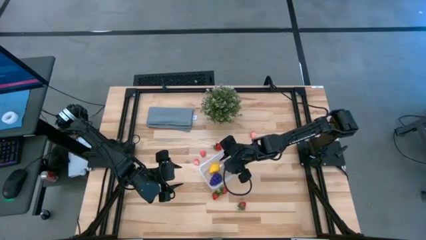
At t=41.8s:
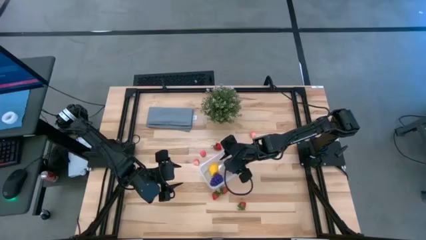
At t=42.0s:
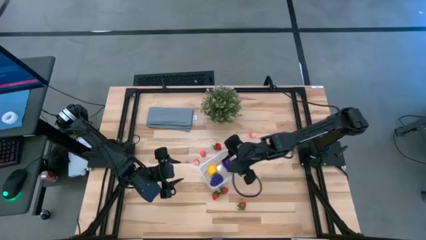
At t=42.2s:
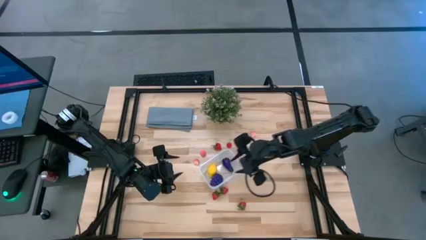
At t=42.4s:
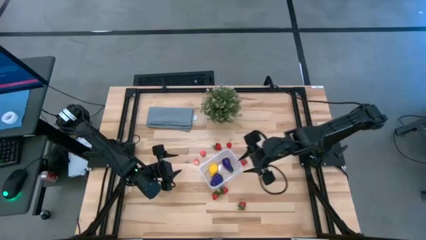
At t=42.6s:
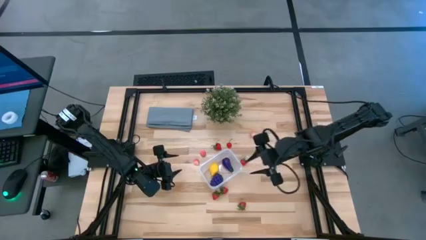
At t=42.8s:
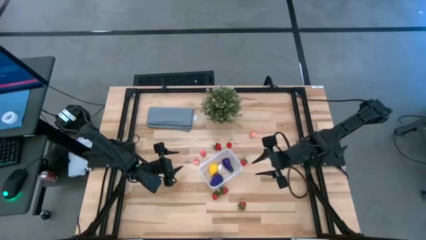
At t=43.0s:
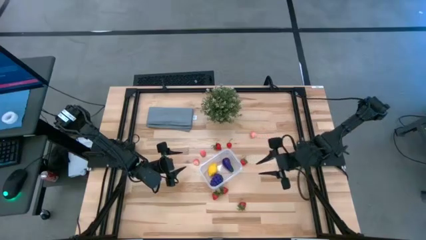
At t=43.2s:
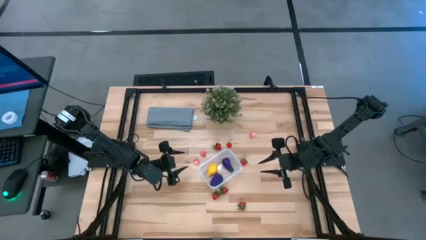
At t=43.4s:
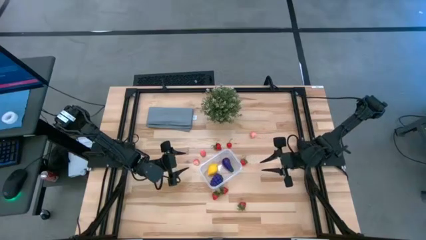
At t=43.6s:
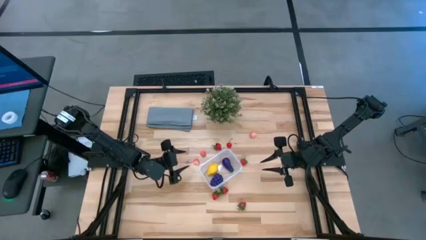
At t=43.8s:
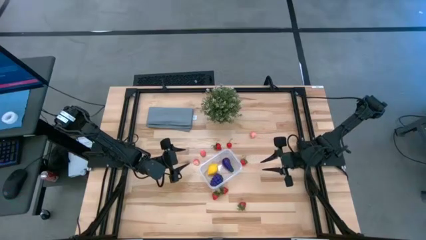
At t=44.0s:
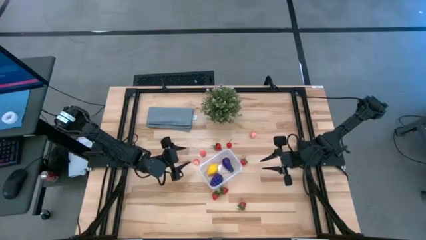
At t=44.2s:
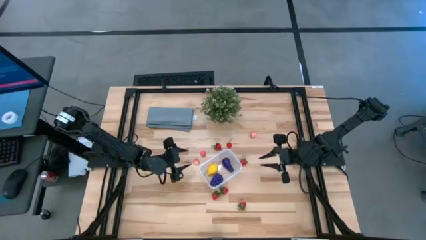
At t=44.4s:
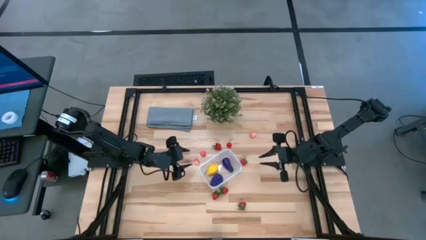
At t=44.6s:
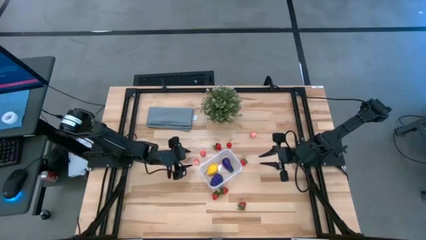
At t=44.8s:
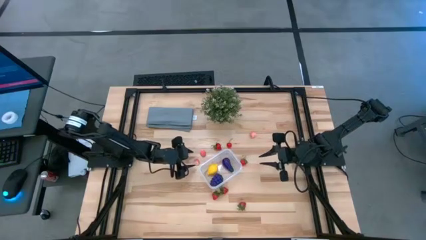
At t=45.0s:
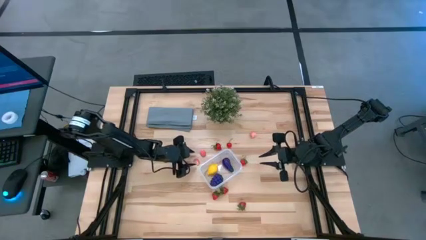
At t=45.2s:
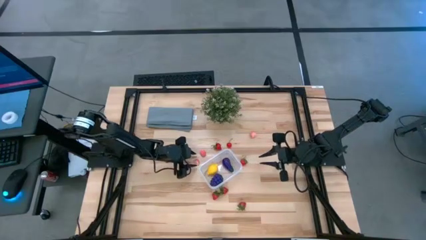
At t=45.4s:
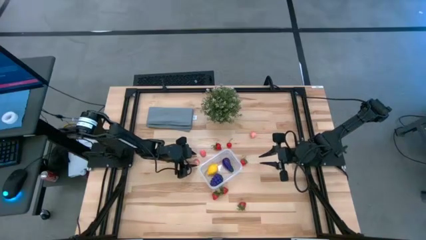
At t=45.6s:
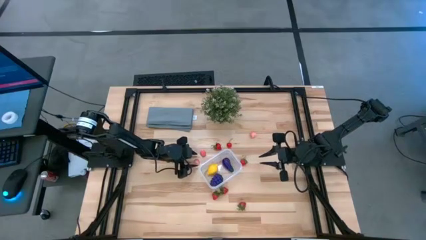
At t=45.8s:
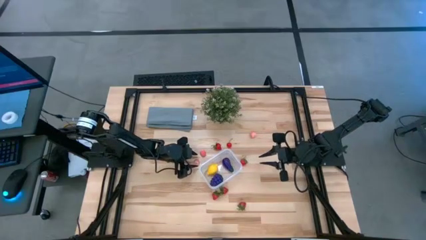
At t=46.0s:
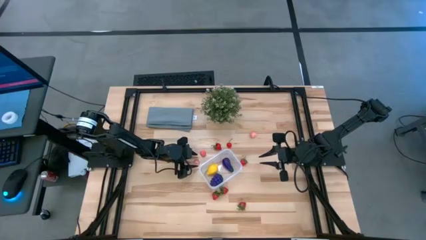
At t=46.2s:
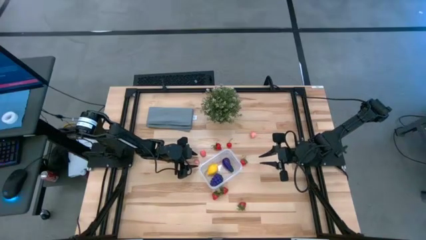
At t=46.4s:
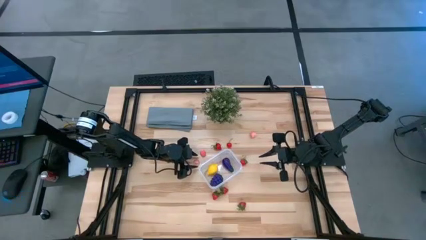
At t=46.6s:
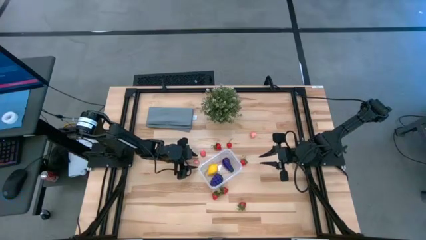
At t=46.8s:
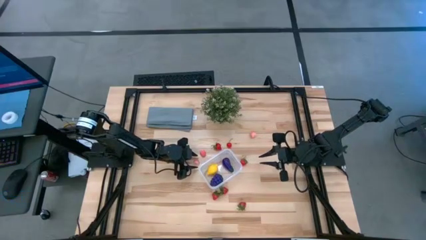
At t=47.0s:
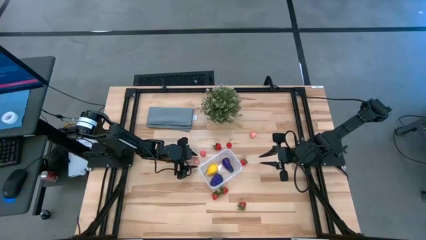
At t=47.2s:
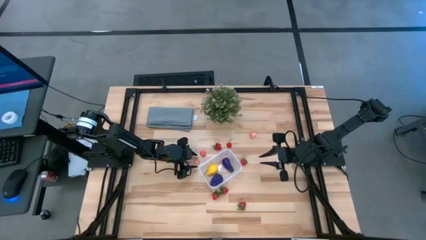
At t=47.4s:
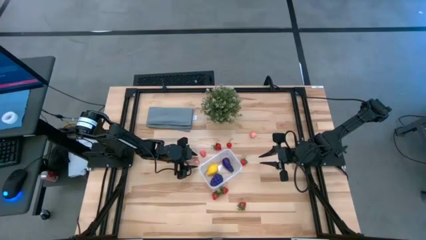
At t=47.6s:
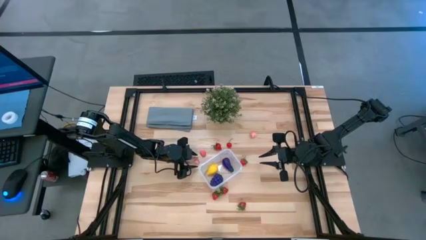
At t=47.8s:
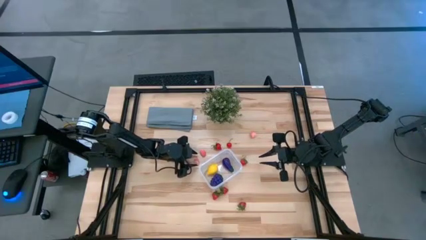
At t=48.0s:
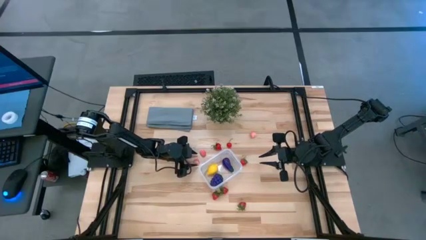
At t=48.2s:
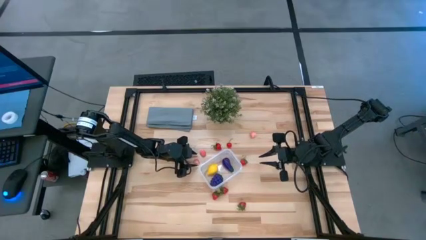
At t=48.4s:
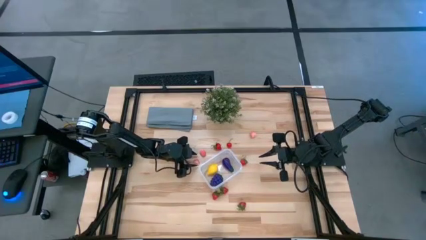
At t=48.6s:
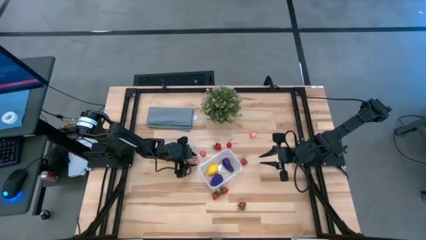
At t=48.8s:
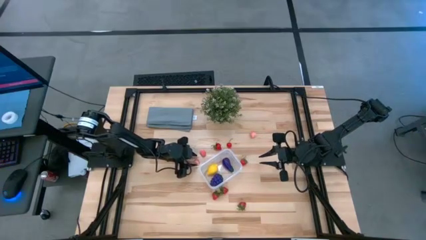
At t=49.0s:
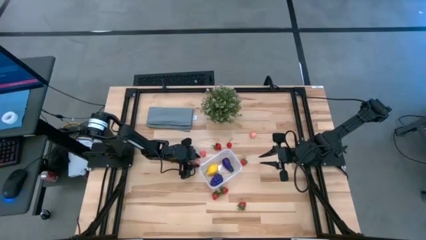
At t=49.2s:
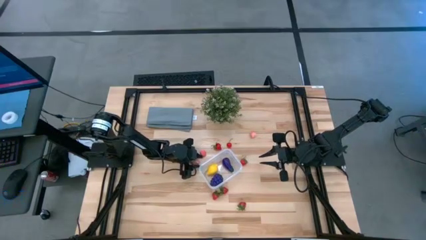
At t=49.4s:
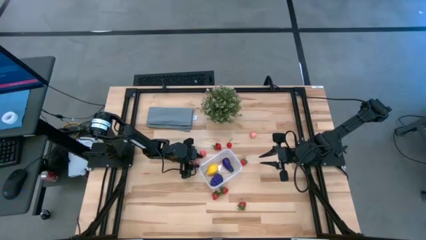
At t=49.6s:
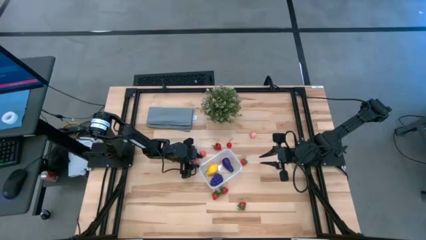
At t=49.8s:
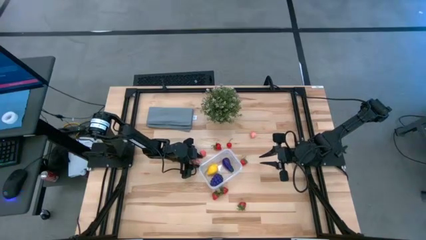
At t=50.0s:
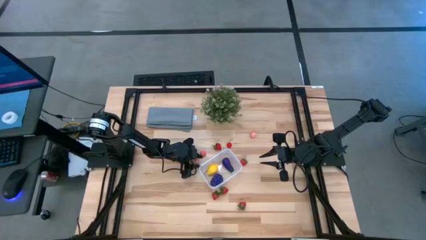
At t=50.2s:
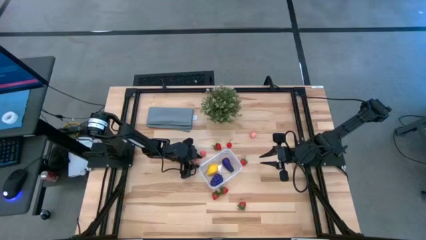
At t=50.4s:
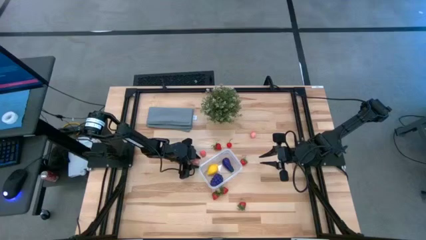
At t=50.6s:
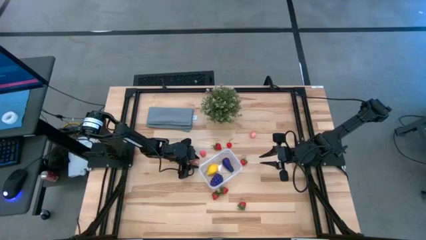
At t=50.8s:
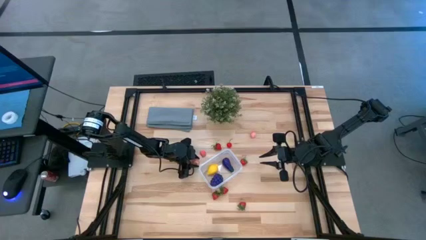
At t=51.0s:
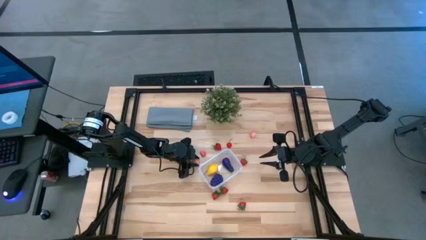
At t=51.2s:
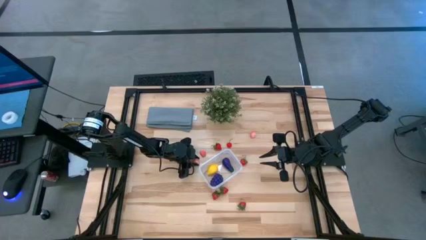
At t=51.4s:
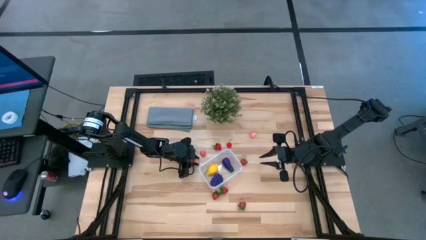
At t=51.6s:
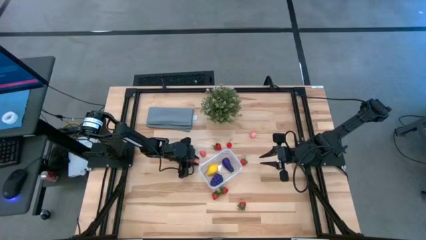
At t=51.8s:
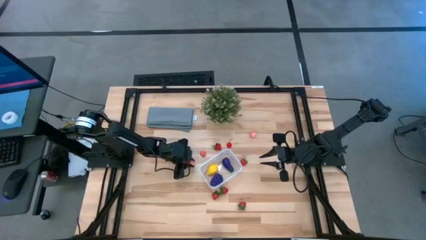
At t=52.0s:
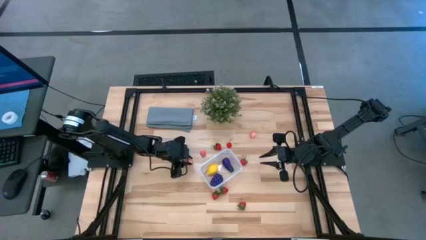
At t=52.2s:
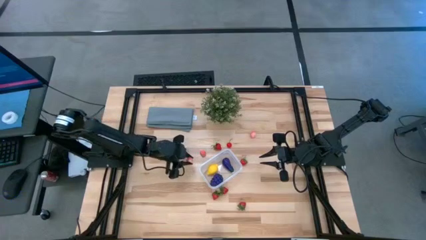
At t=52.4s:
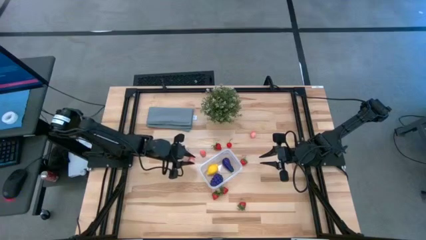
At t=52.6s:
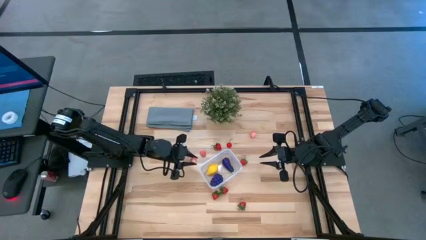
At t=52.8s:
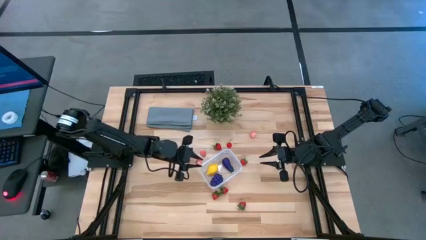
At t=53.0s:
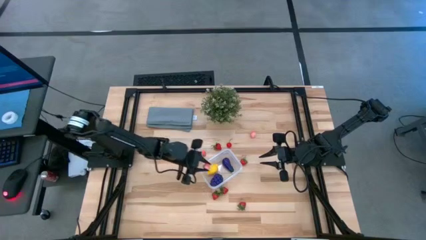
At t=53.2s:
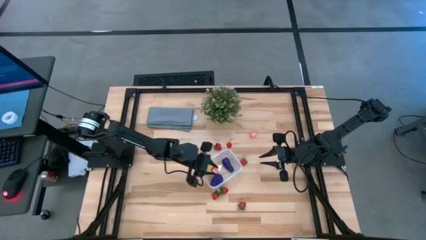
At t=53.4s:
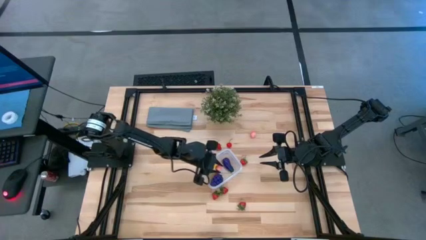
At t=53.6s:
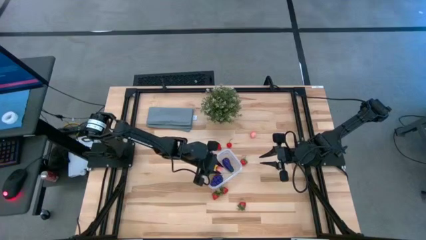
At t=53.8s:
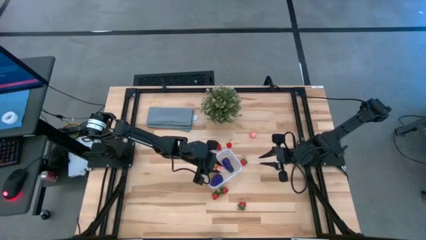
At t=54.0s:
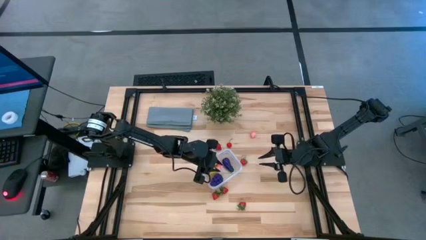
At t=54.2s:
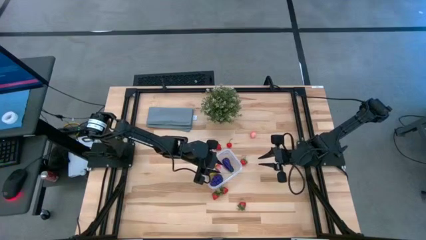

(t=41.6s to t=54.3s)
Task: Pick and placing Produce into tupperware
Put the bottom peach into the transparent bin
